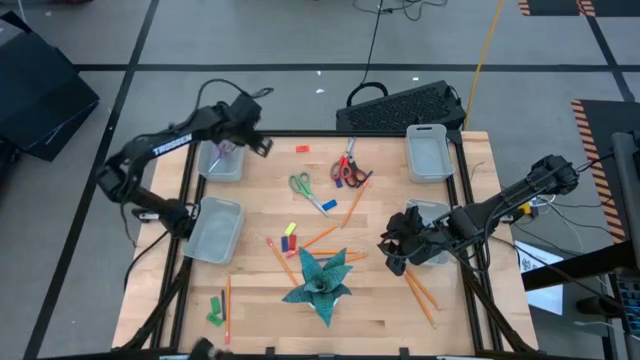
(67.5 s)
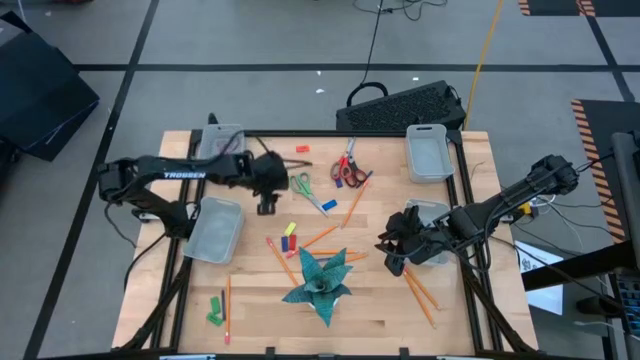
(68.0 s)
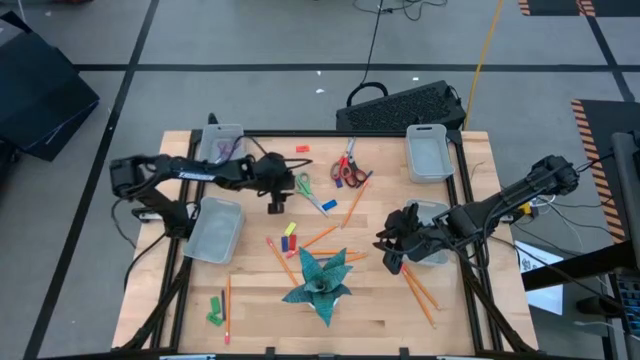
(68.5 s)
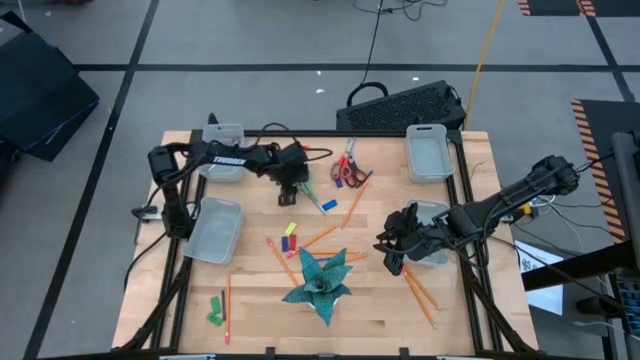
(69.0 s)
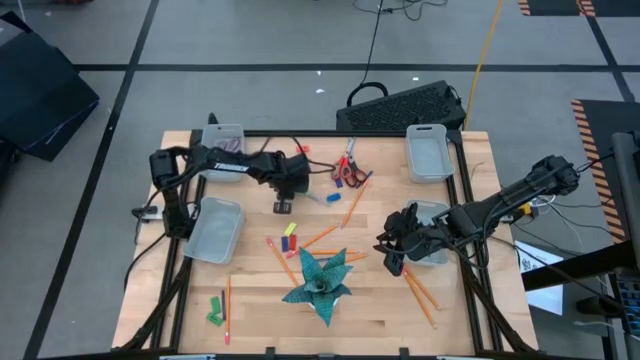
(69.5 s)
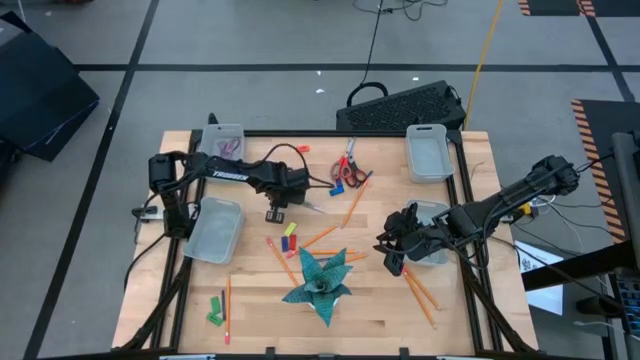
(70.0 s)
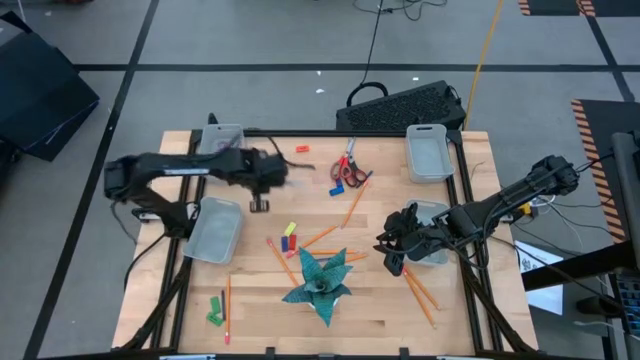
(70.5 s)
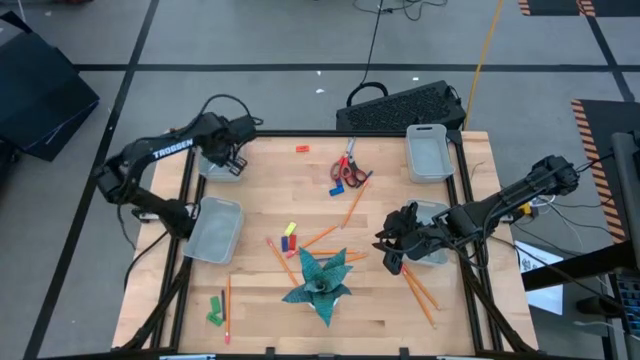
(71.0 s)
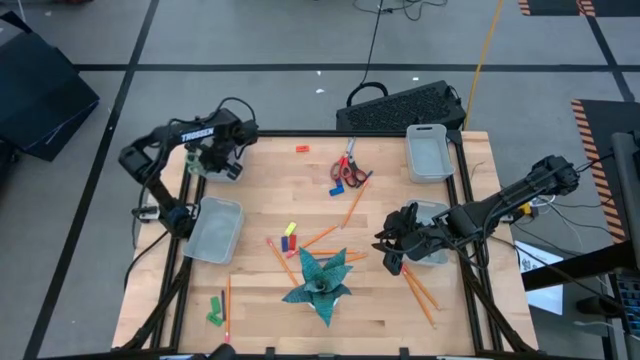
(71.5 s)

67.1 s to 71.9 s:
Task: Sort crayons/erasers/pens/pencils in bins
Put the green scissors into the top left gray bin

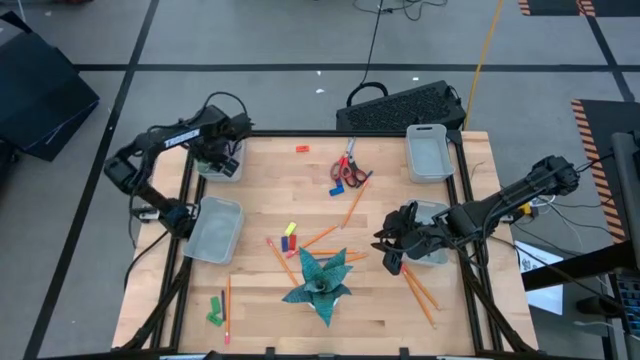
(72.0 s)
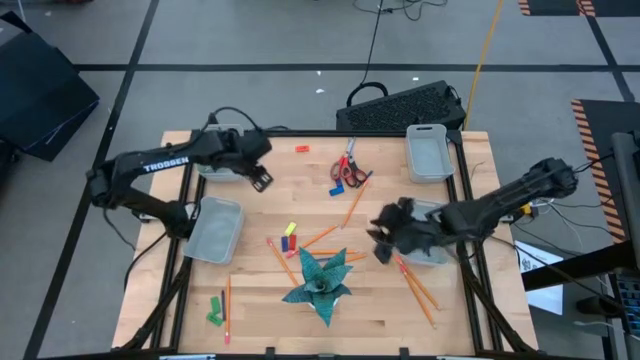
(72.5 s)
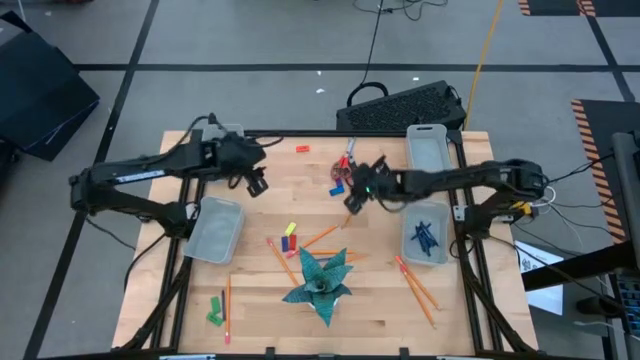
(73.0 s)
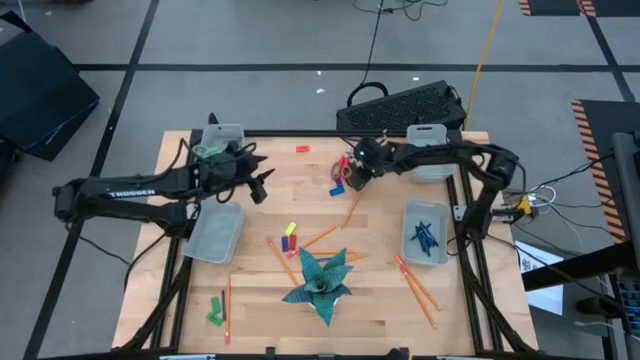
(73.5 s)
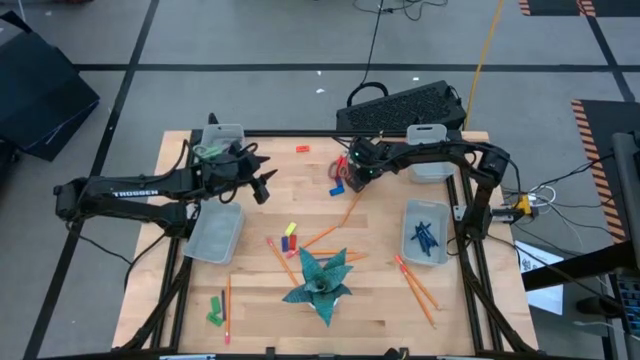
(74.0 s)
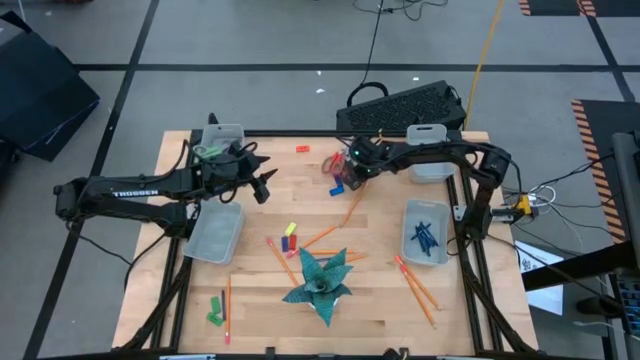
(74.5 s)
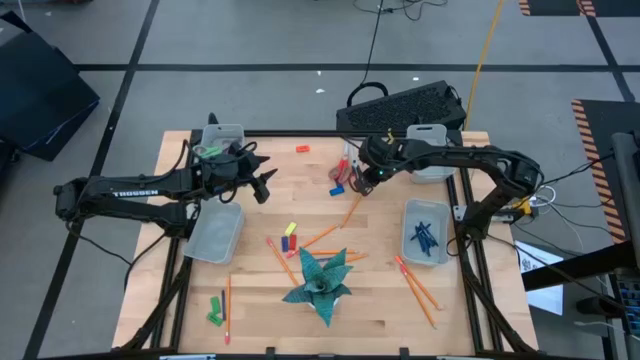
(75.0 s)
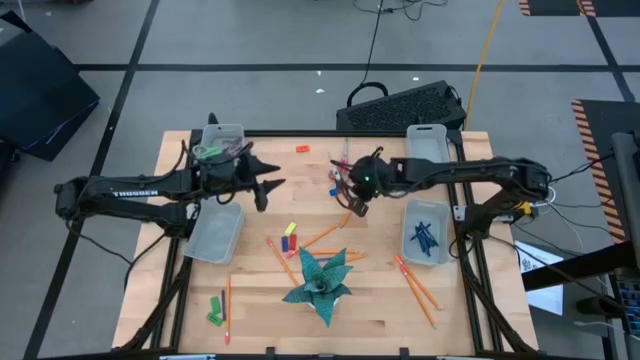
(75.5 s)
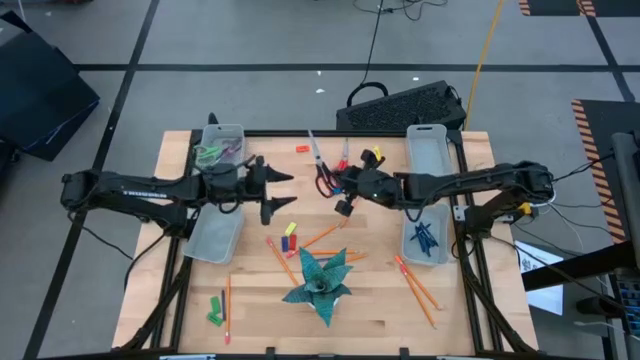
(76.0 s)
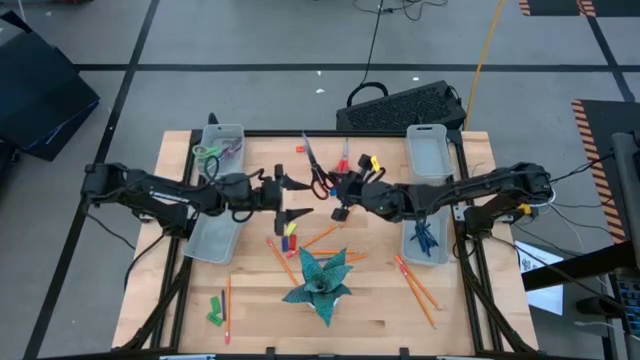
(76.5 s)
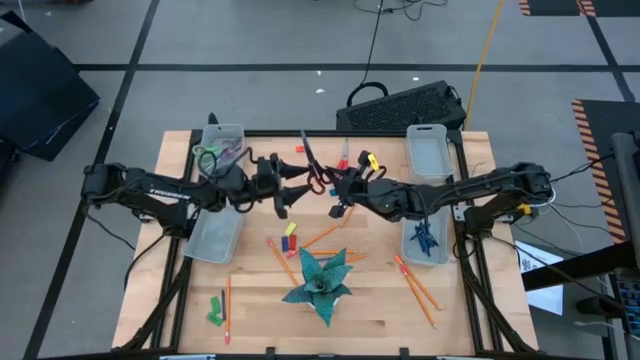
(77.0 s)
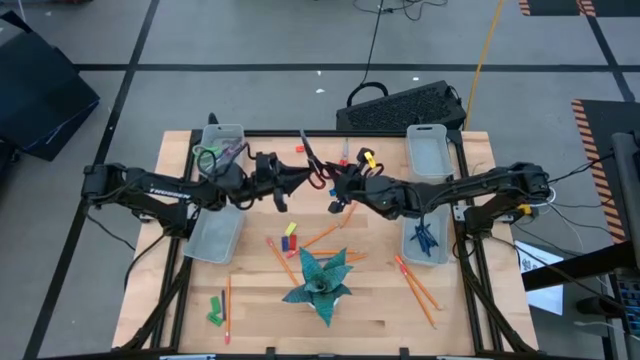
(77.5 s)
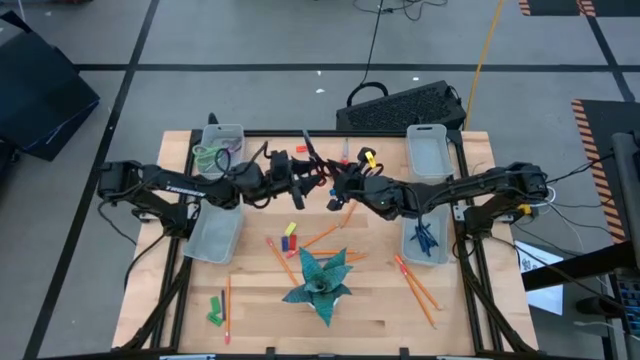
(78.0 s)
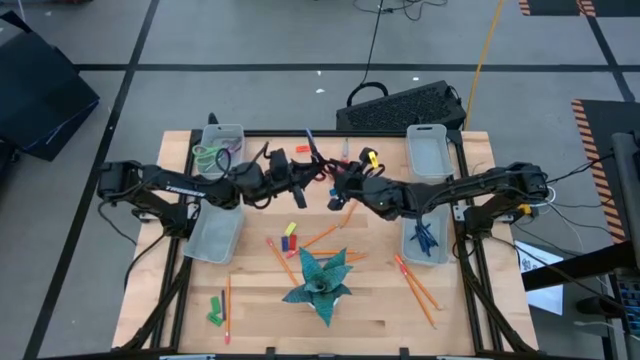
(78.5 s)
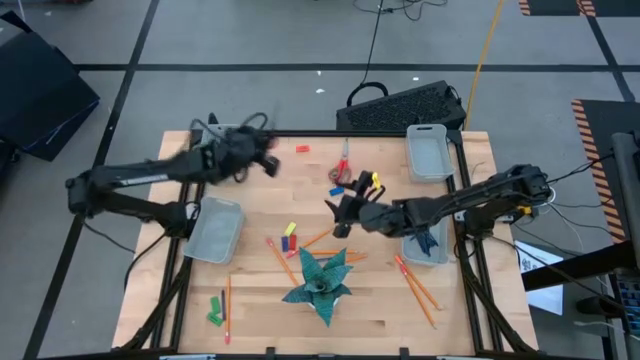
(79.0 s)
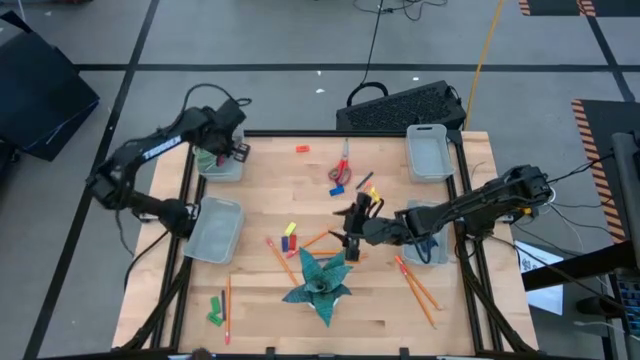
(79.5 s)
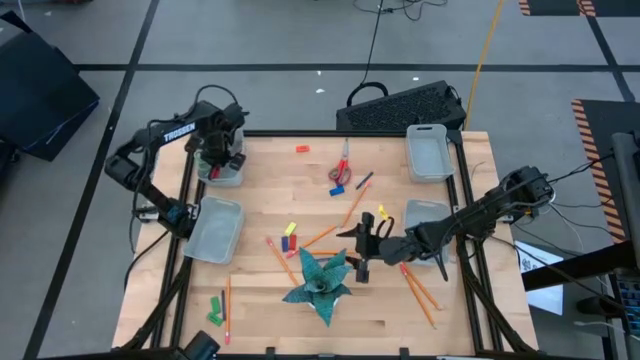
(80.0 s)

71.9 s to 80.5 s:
Put the black scissors into the top left gray bin

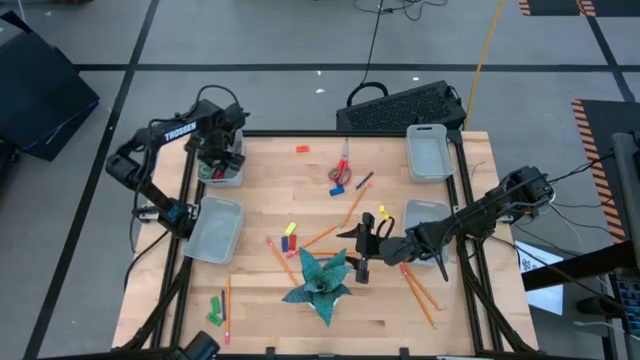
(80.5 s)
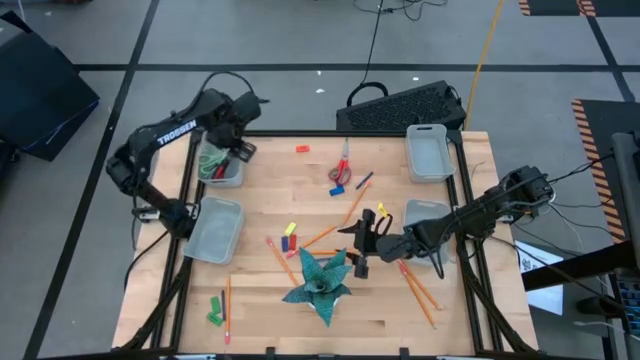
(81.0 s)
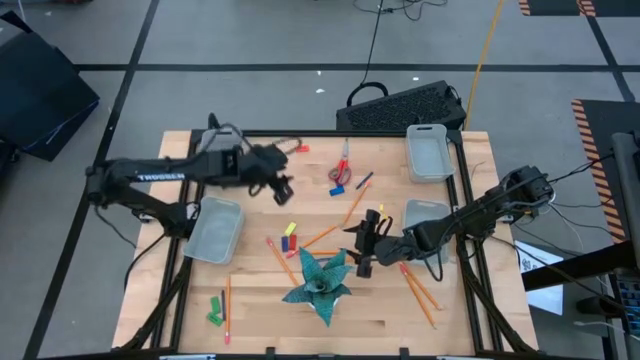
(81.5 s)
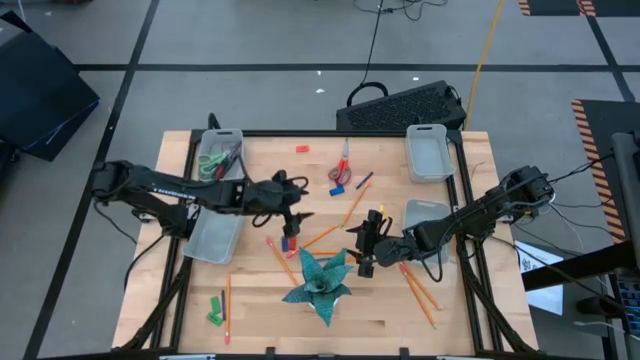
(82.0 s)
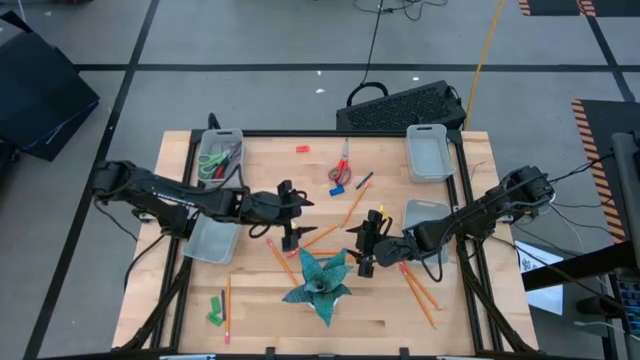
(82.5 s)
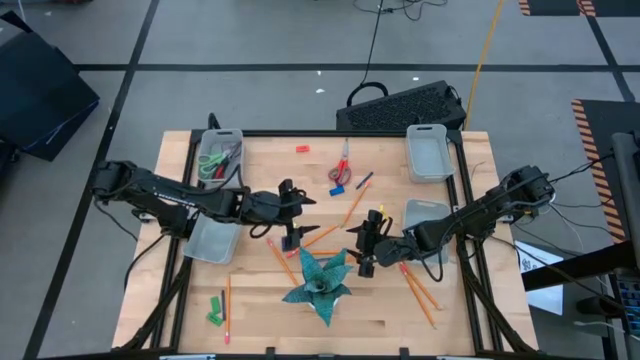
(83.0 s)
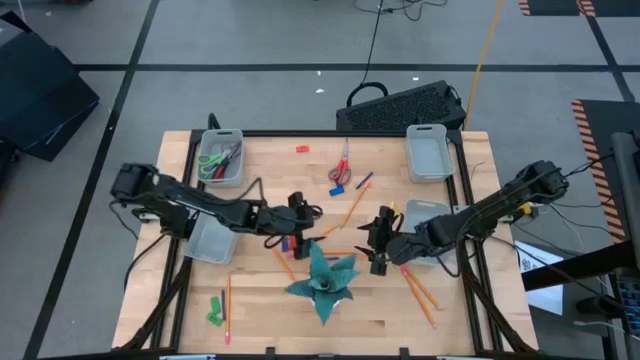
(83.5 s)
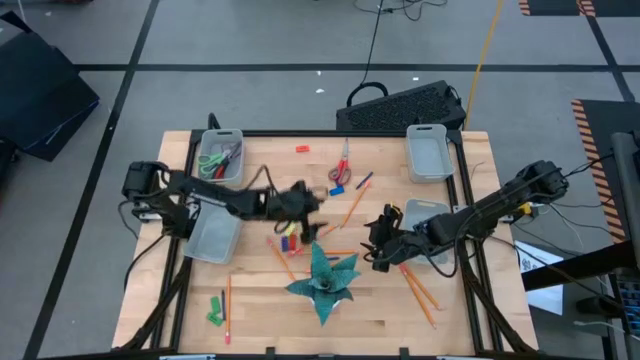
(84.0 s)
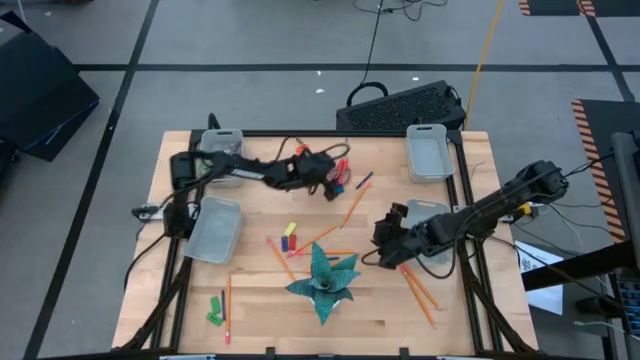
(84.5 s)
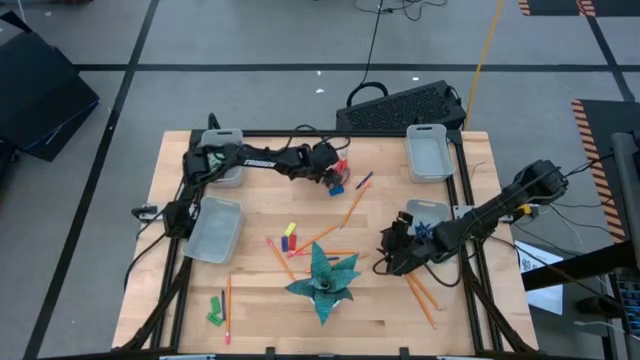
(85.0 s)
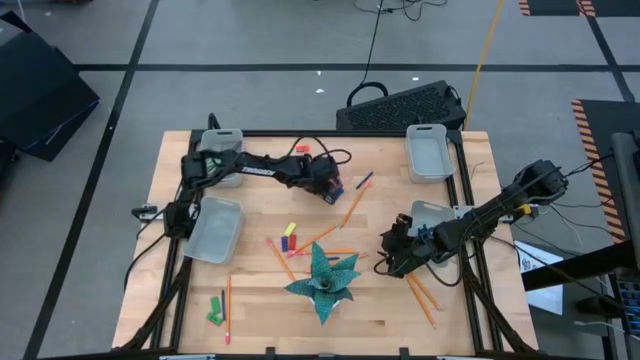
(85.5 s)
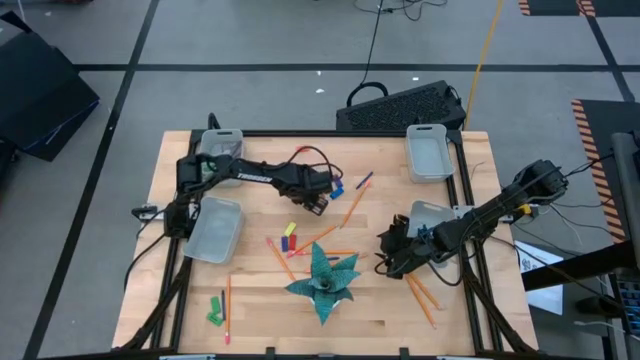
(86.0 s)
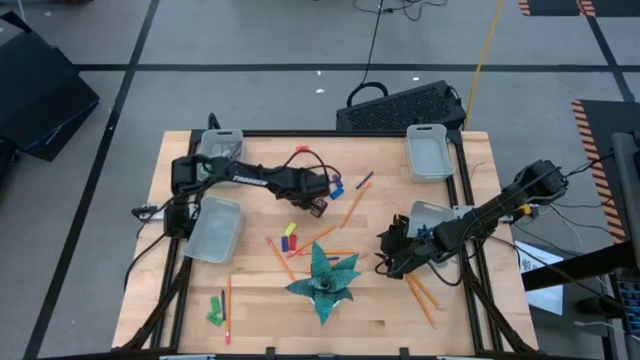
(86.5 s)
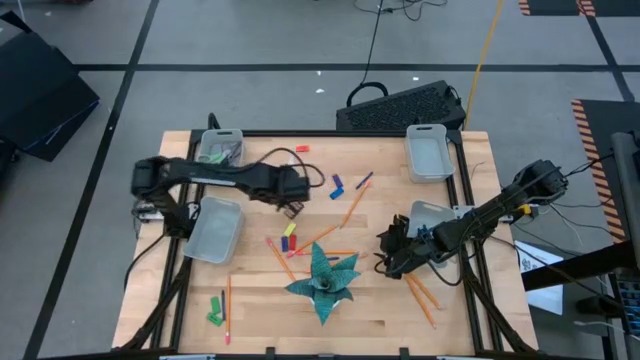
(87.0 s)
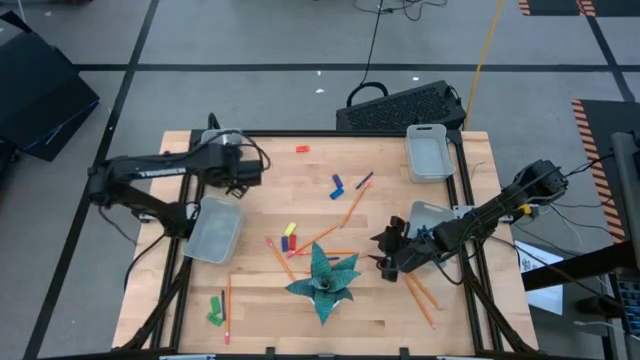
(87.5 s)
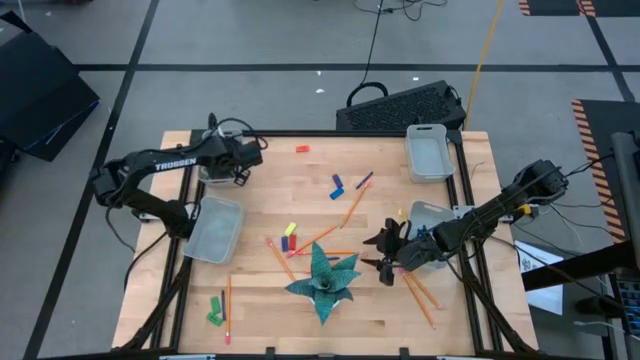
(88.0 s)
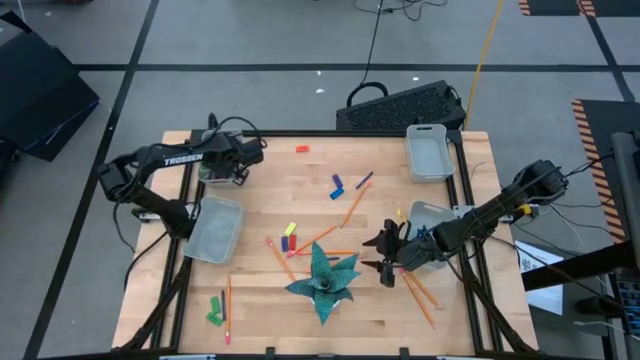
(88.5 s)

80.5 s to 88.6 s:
Put the orange scissors into the top left gray bin
